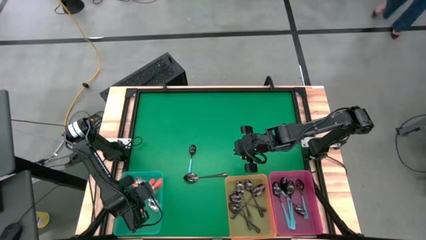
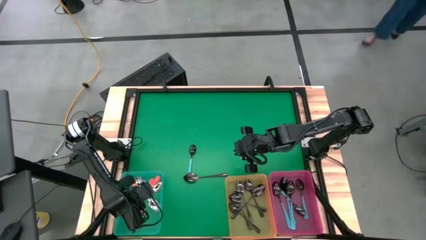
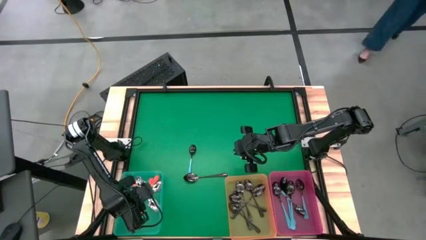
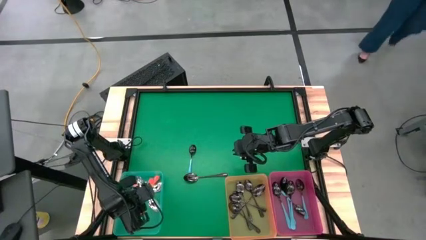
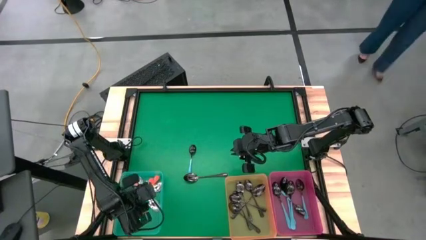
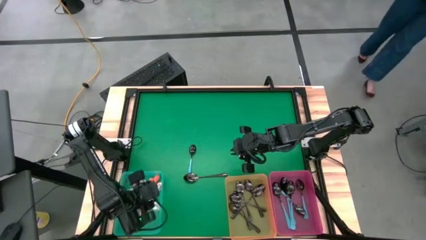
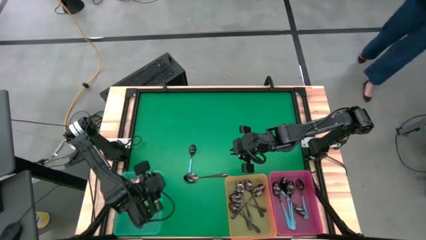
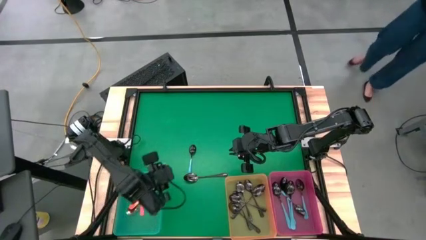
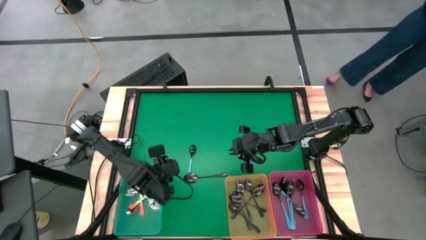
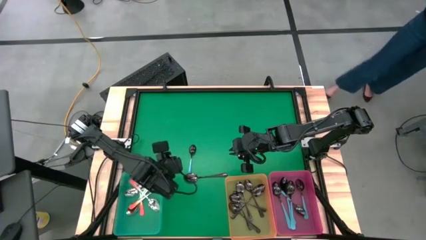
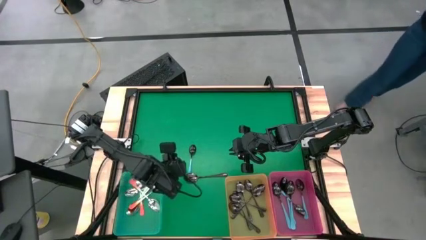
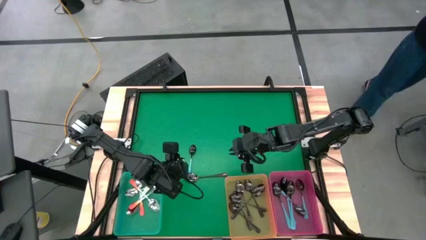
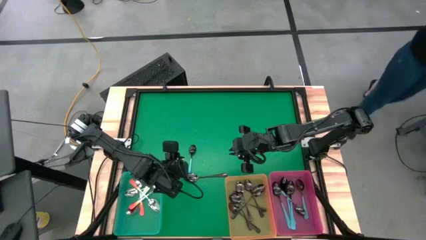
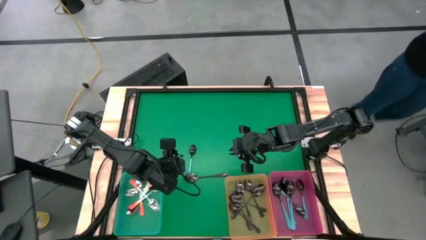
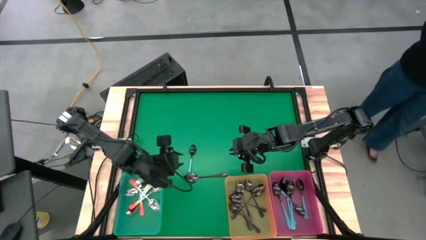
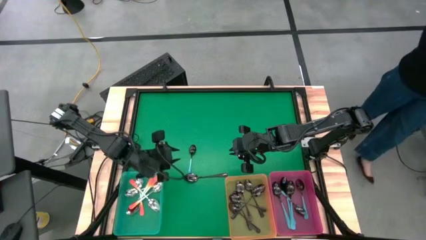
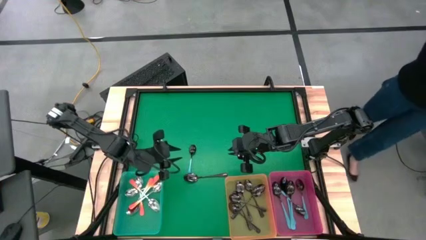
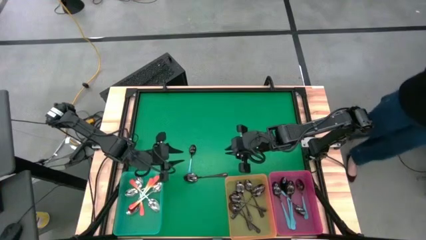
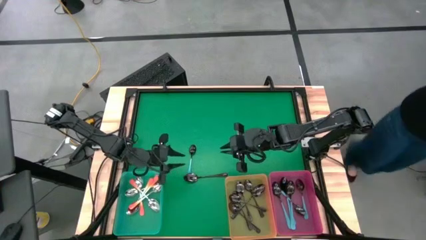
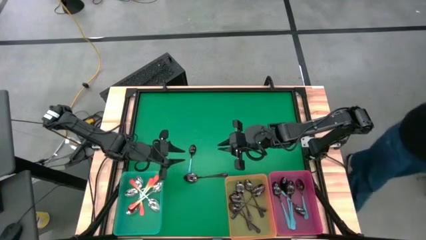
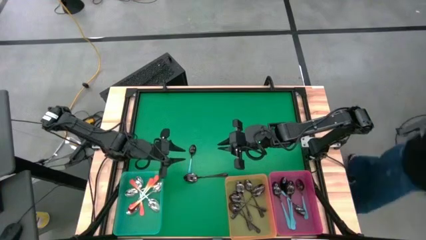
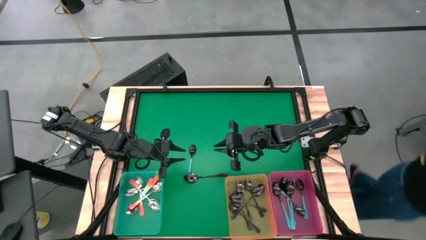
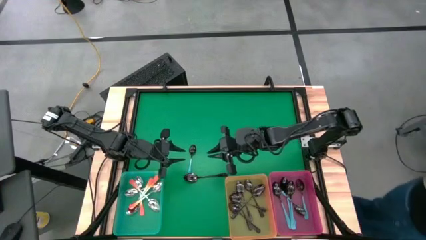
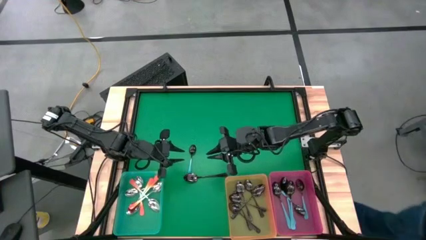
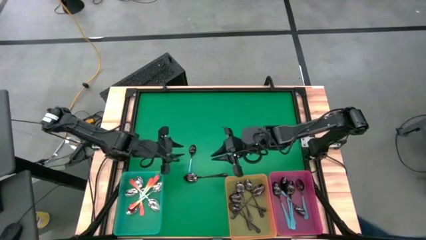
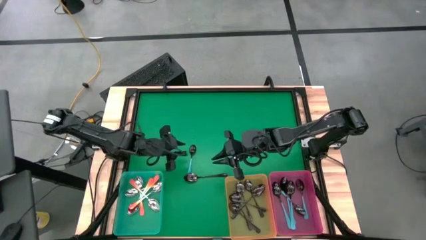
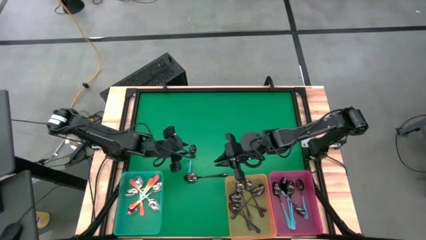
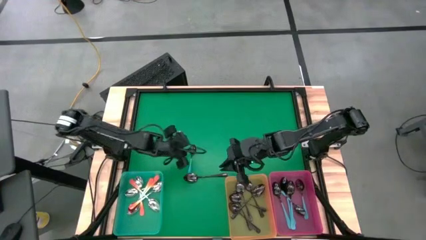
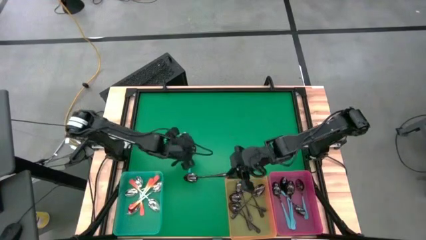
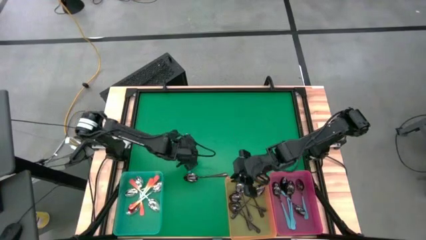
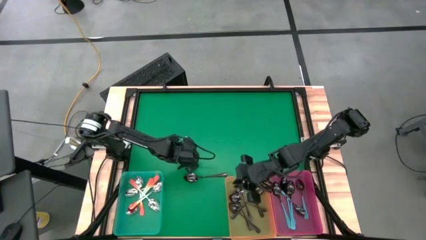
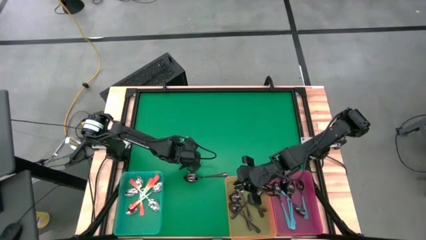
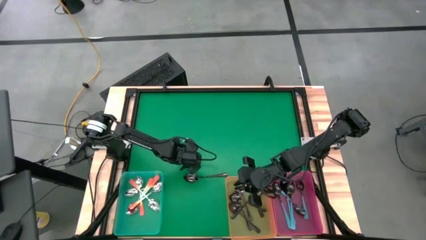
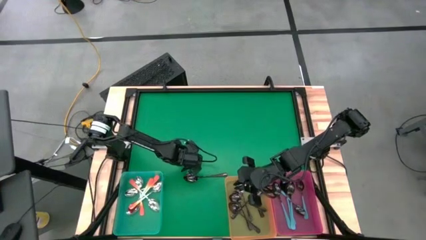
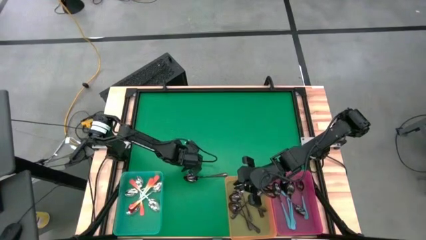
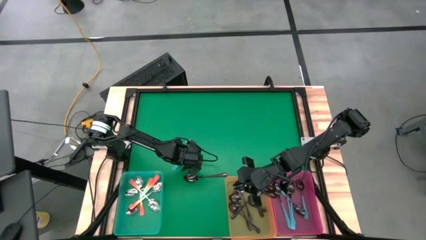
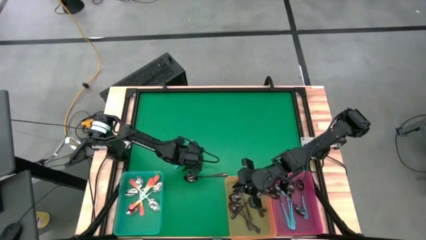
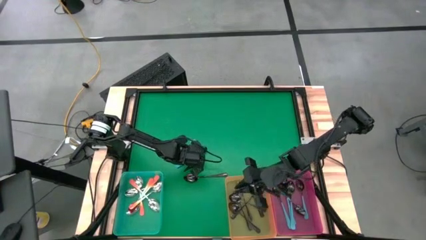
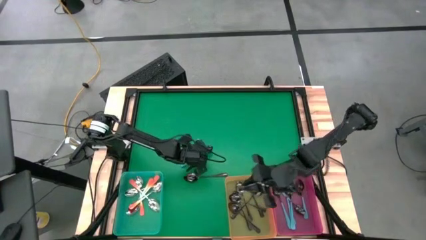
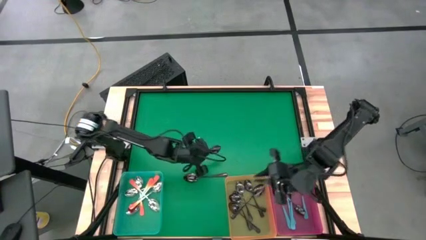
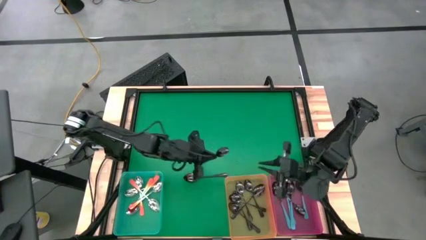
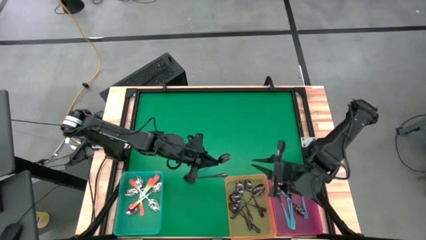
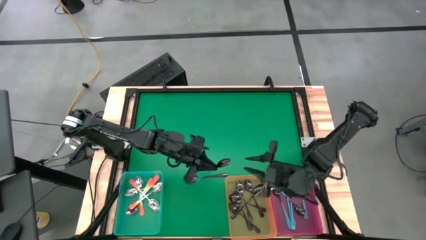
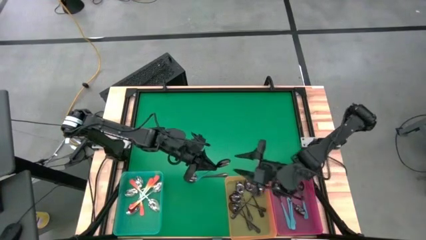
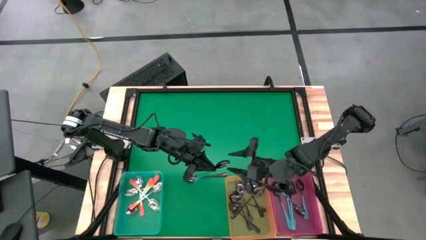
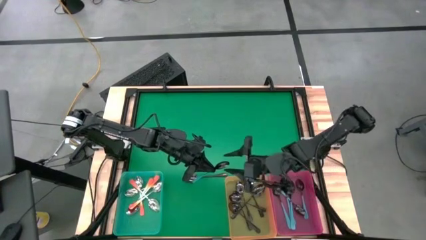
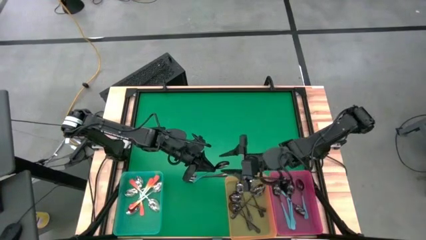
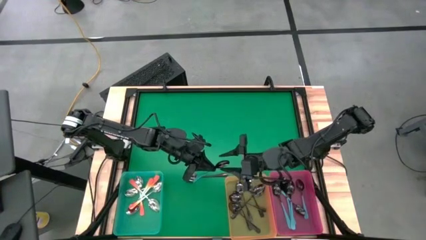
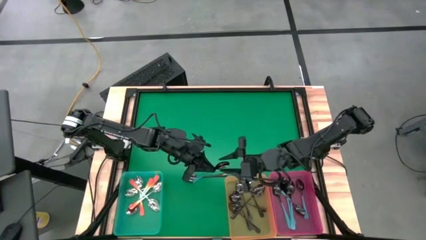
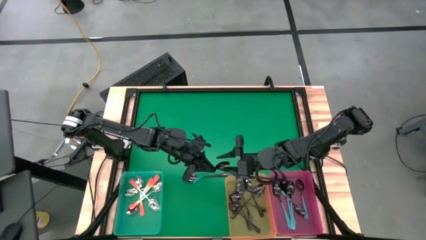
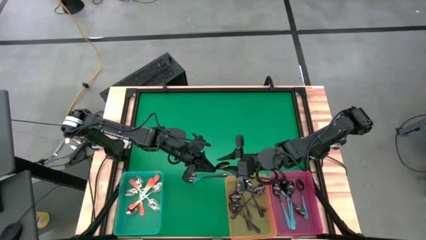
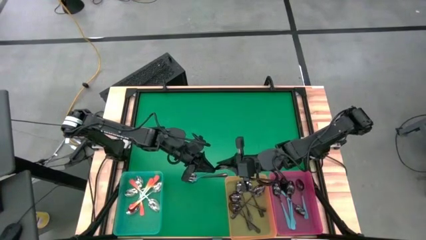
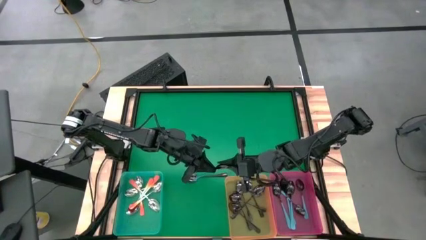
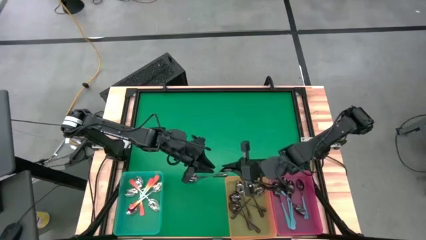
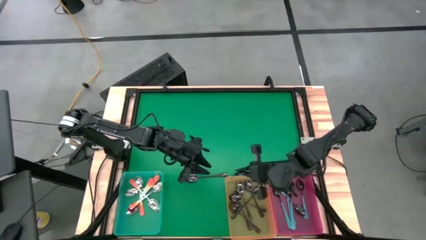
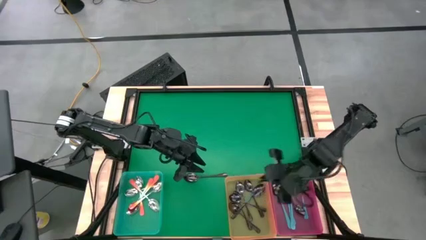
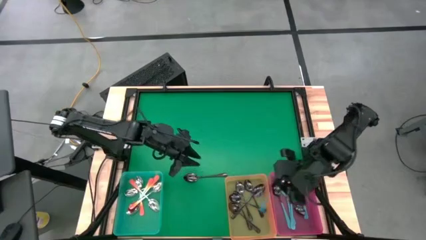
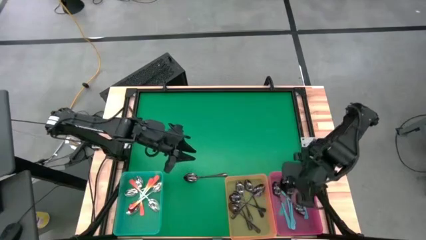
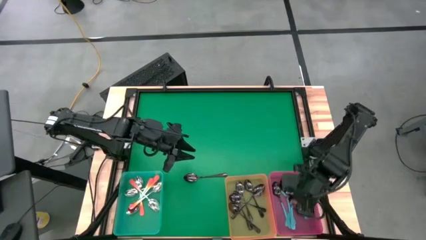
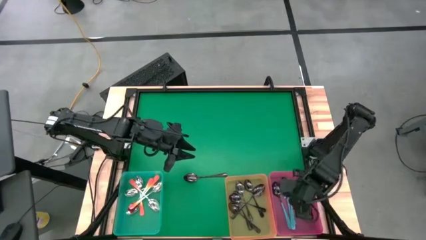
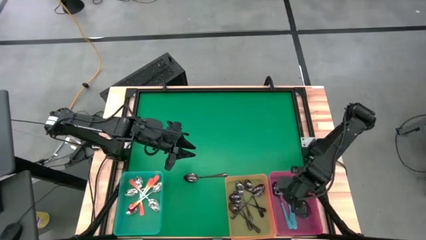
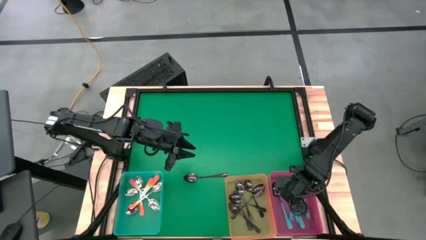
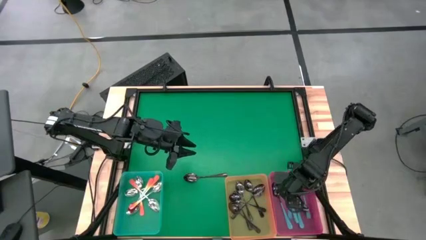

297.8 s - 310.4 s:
Task: Sort silverware by color (type)
Put the blue spoon into the pink bin
